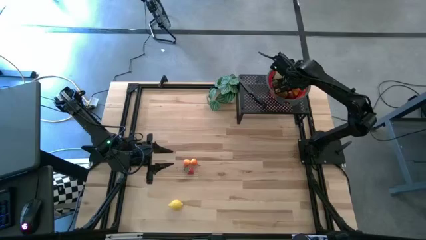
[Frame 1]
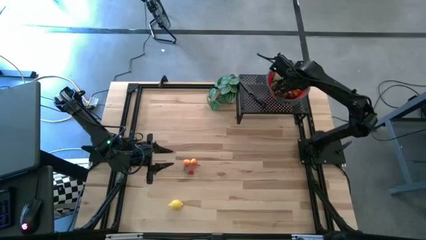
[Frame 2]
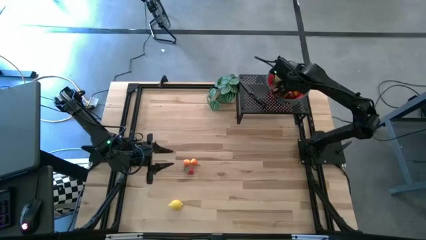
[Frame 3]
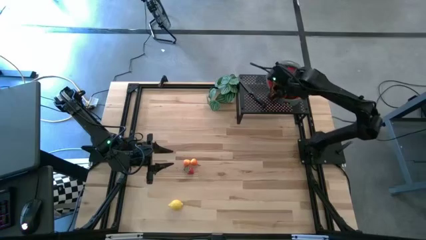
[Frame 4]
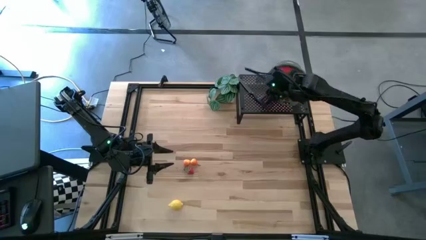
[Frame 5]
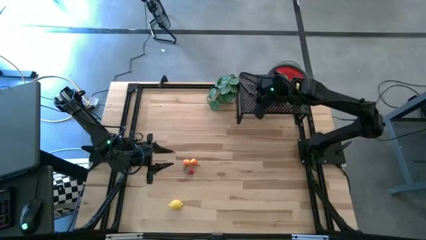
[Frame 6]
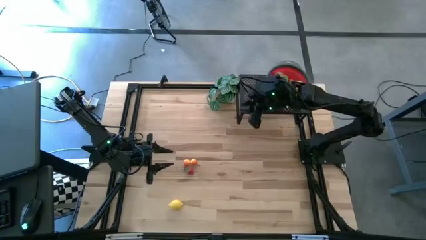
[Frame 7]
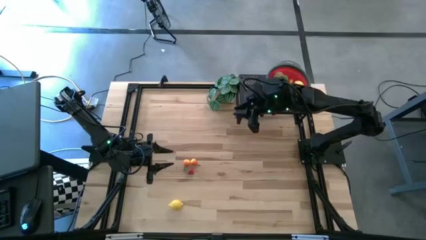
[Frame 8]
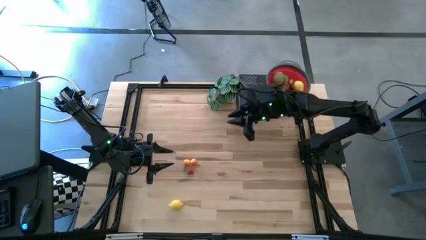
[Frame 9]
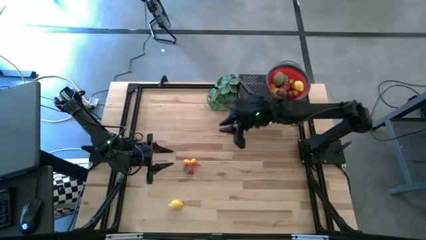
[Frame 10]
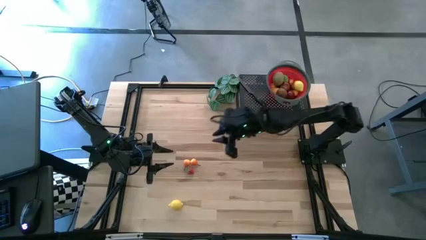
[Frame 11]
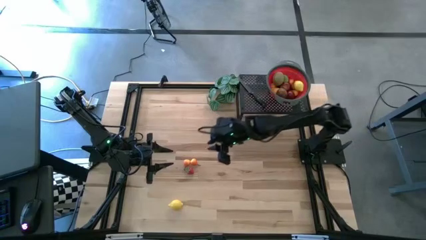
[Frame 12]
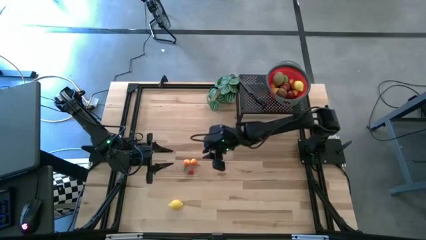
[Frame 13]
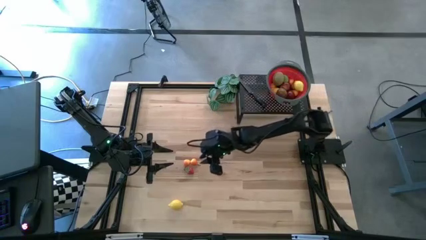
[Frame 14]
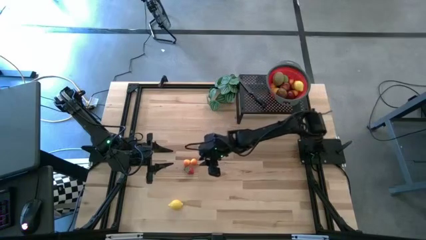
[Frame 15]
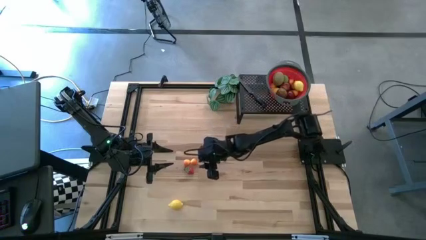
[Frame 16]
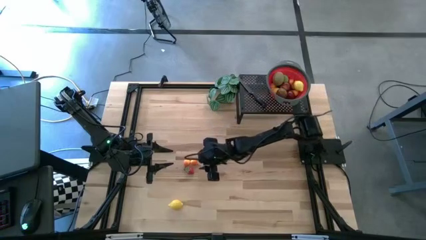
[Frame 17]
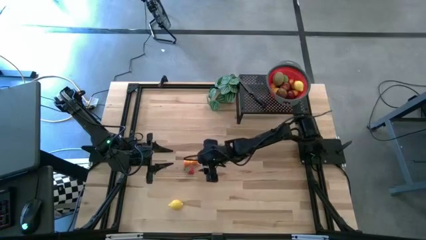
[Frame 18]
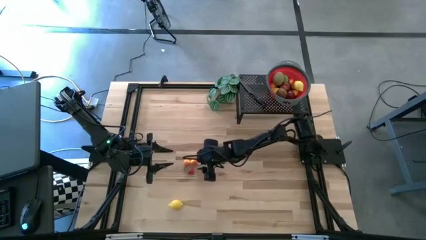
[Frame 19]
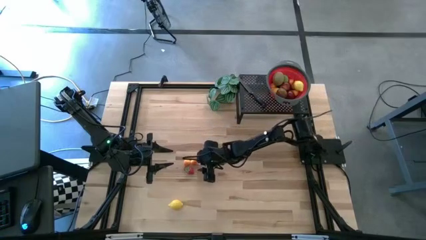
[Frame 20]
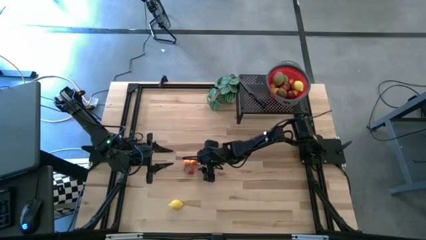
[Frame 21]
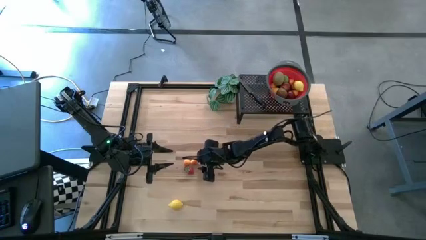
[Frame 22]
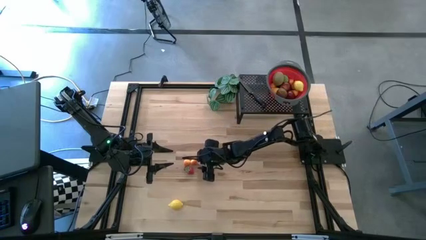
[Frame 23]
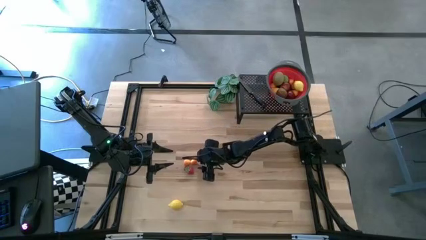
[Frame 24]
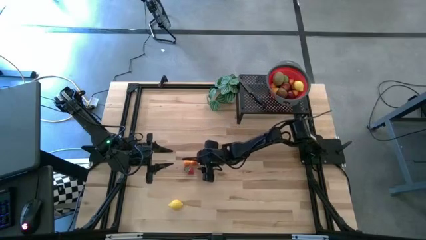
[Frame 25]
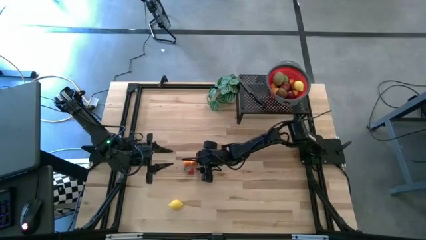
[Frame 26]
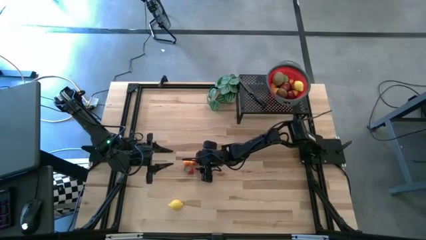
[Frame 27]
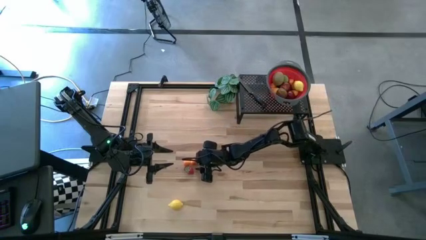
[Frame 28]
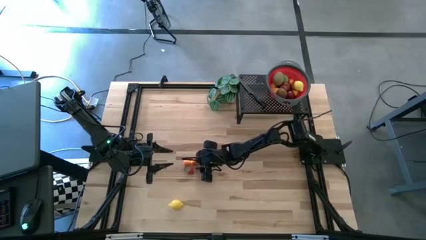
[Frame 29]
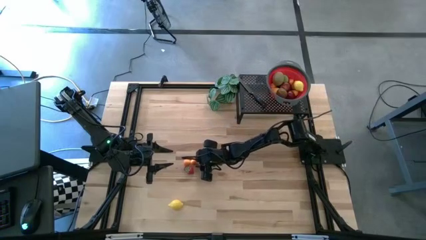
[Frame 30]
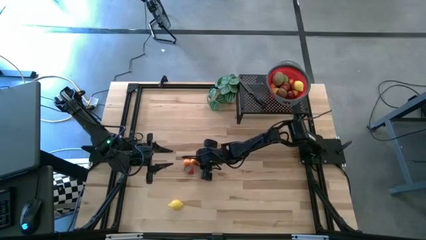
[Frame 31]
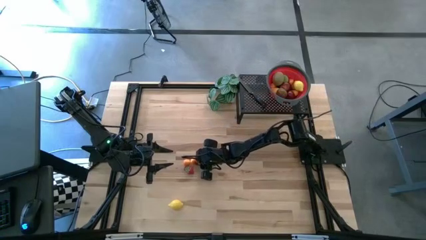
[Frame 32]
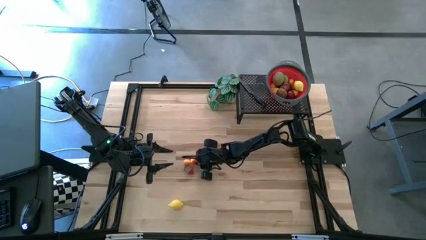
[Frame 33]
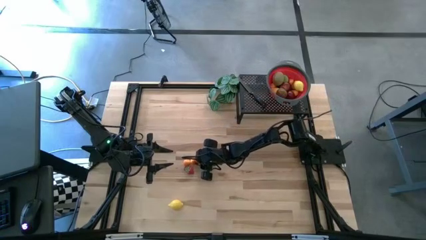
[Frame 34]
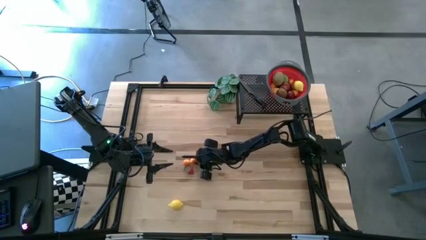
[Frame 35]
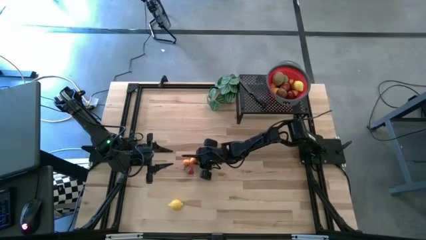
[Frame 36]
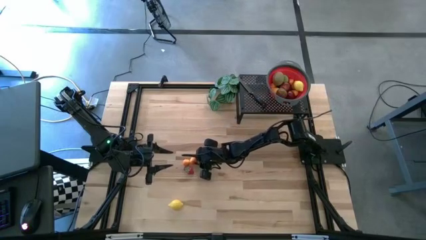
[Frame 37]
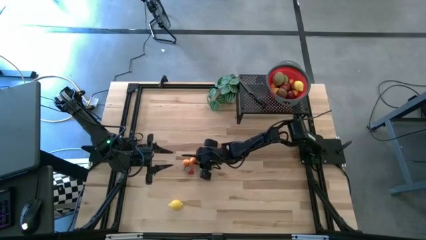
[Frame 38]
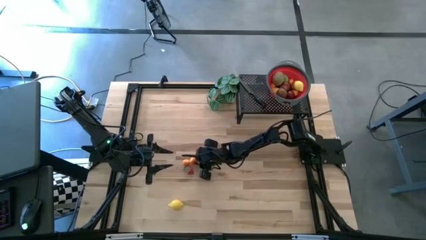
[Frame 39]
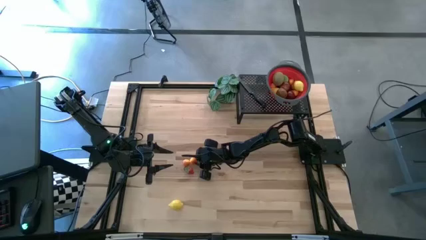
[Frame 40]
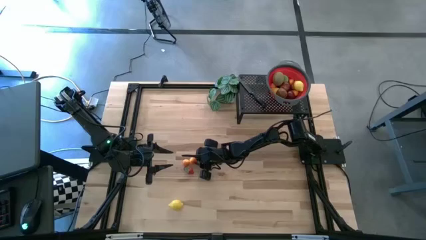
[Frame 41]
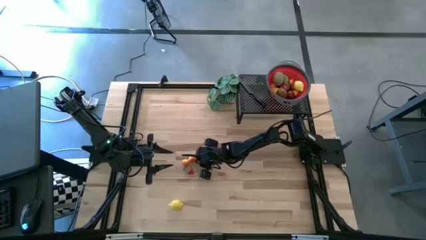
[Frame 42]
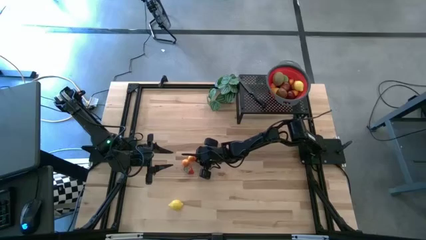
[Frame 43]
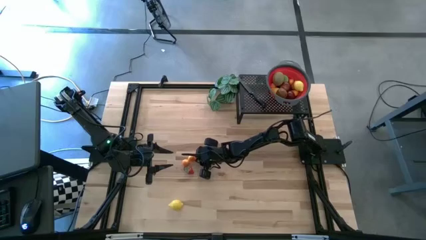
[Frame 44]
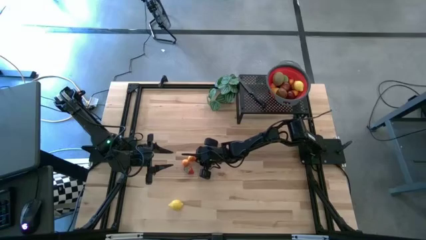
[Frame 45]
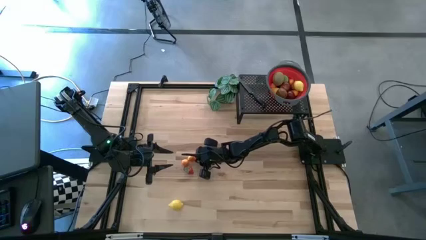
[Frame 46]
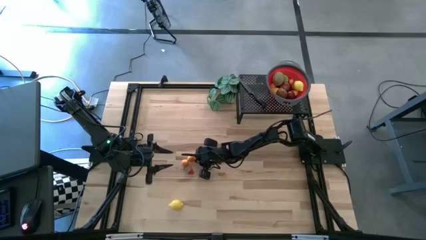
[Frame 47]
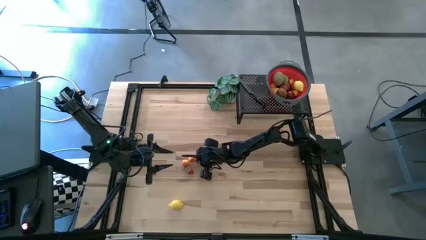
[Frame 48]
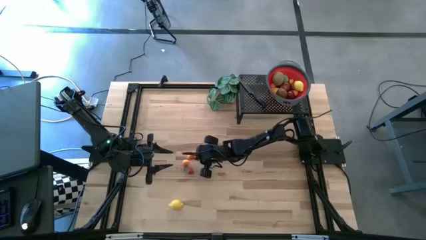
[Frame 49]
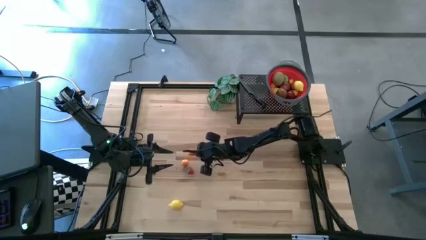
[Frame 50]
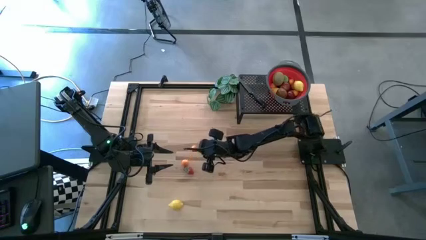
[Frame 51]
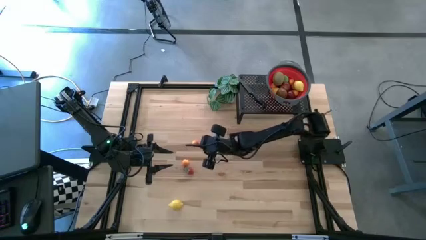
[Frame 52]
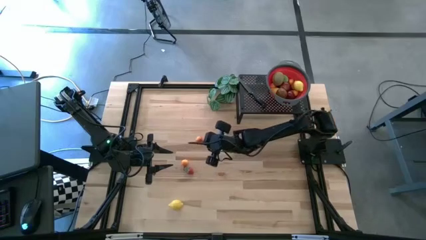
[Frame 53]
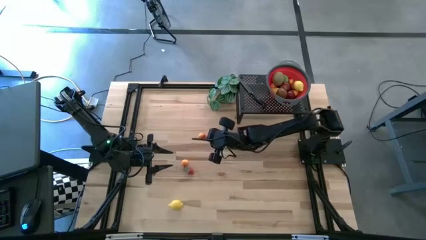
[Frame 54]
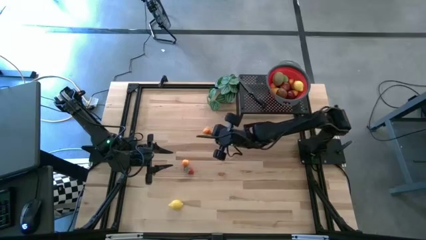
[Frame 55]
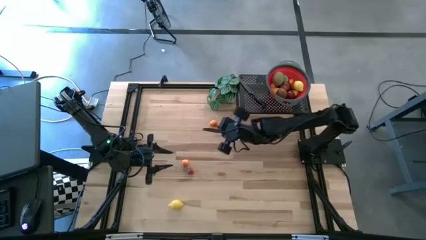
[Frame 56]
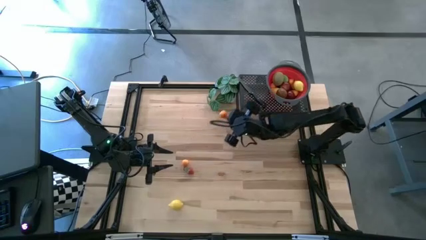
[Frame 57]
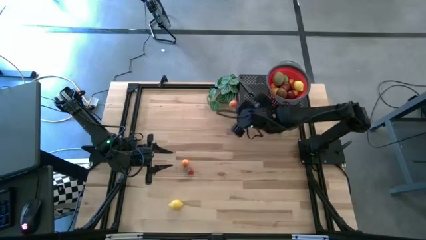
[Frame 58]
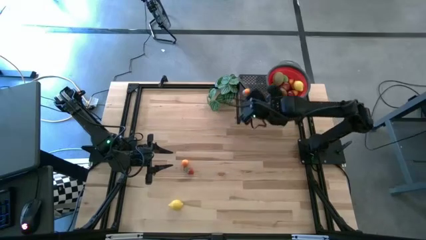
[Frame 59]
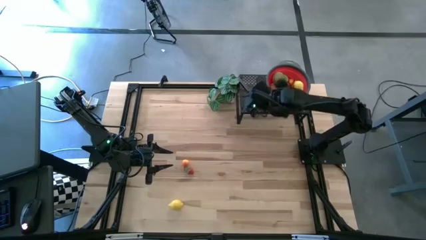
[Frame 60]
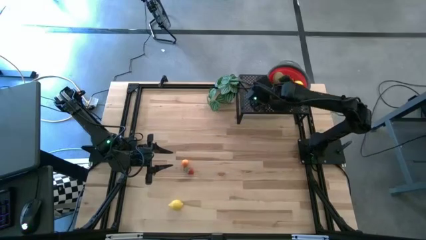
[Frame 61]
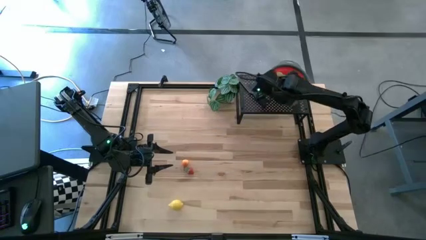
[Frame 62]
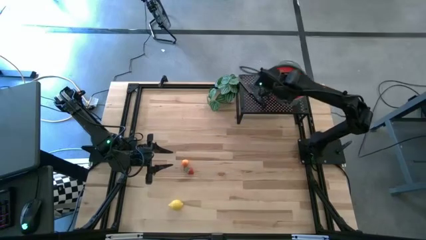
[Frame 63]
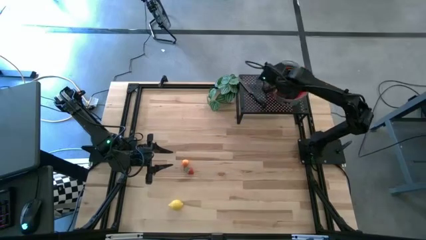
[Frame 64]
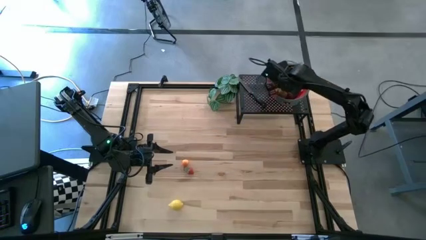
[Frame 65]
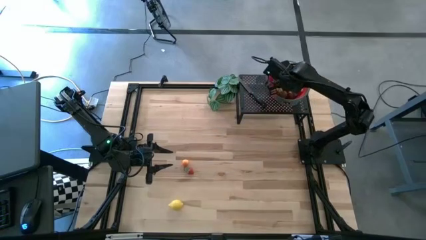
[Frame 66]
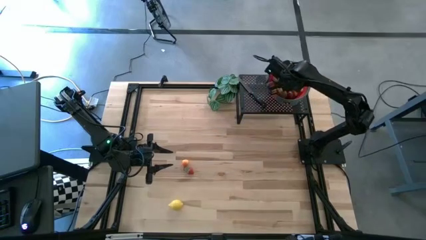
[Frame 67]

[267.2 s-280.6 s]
Task: Pick & Place Fruit
Put the orange pear into the red strainer bowl

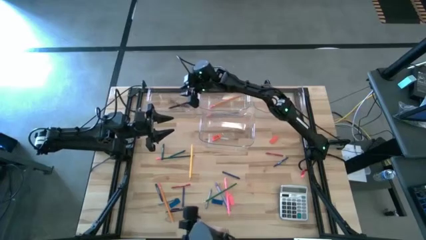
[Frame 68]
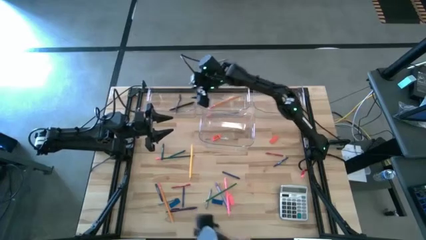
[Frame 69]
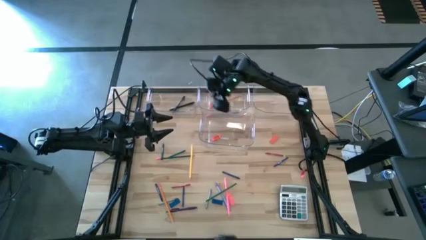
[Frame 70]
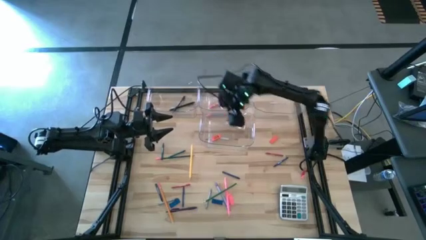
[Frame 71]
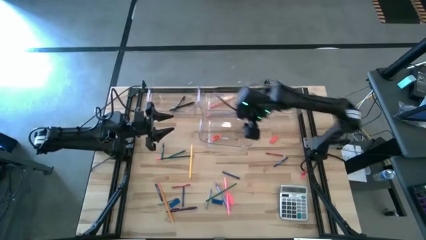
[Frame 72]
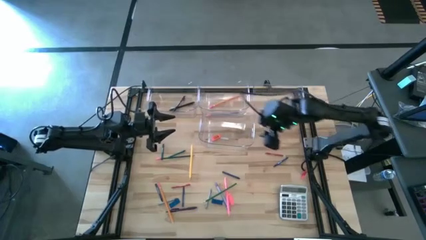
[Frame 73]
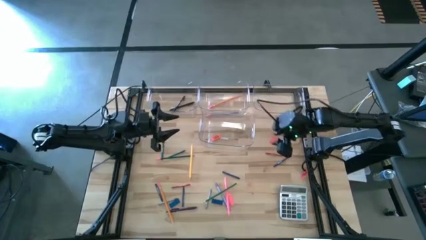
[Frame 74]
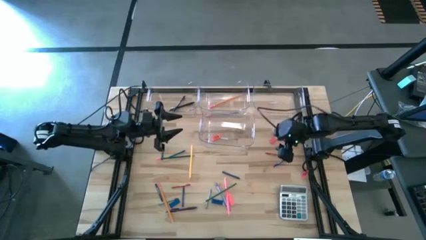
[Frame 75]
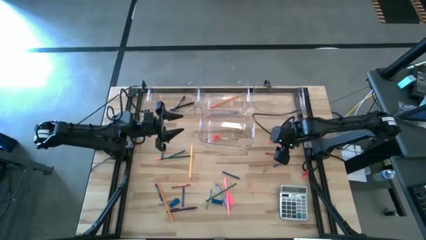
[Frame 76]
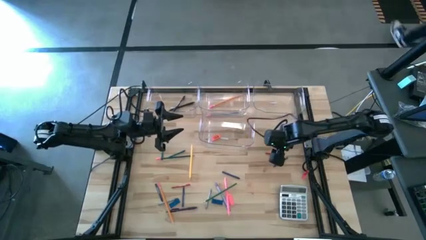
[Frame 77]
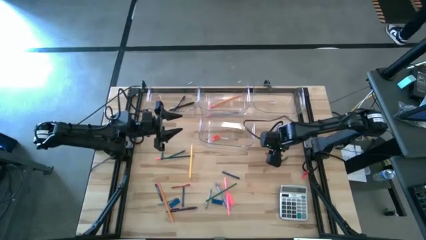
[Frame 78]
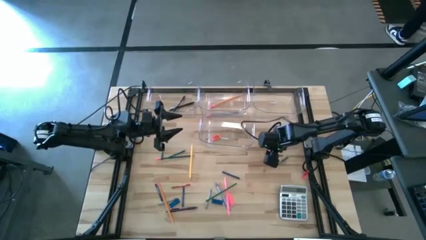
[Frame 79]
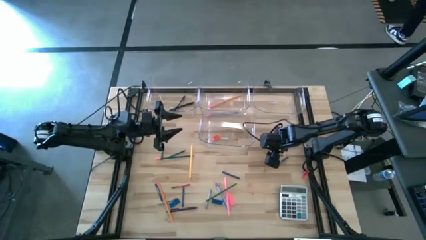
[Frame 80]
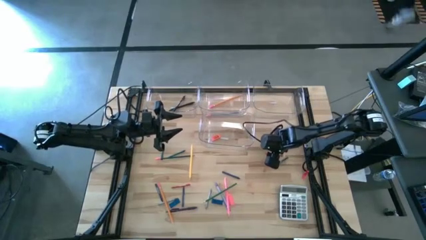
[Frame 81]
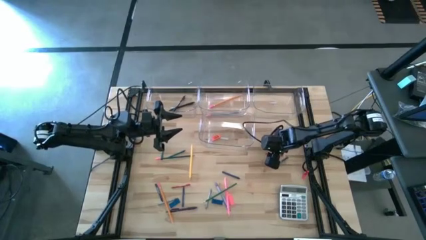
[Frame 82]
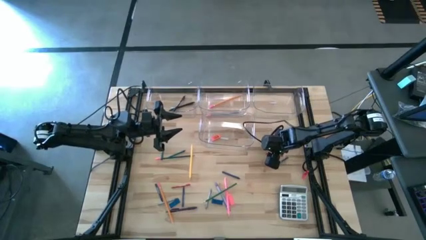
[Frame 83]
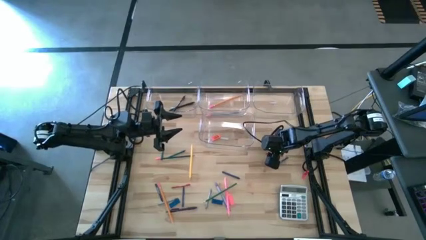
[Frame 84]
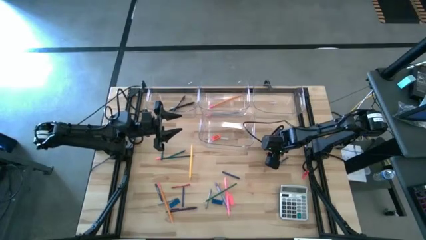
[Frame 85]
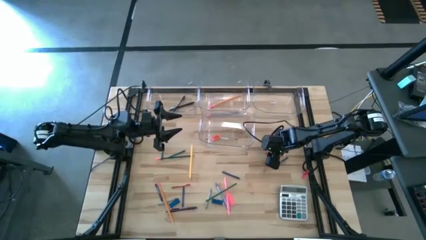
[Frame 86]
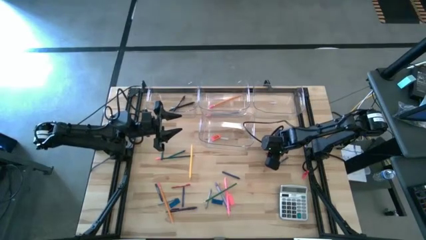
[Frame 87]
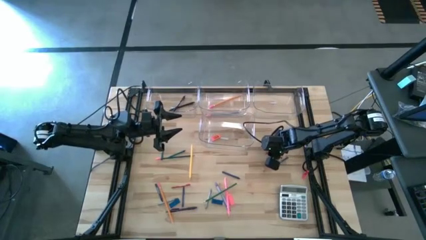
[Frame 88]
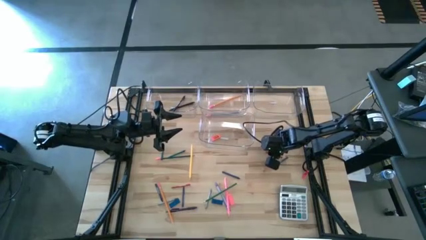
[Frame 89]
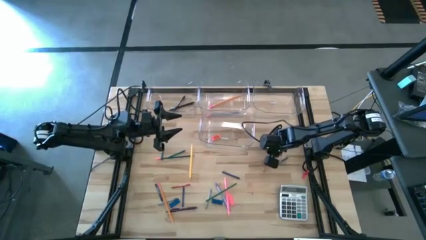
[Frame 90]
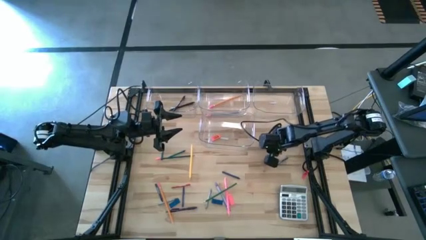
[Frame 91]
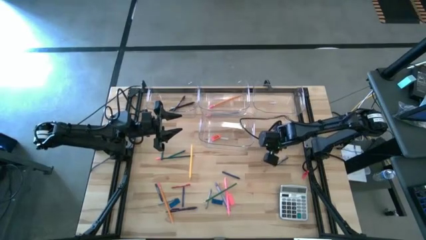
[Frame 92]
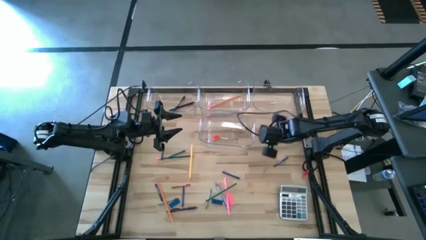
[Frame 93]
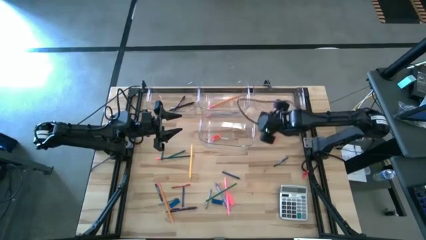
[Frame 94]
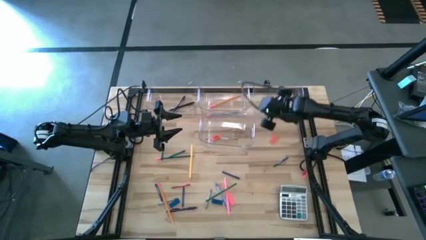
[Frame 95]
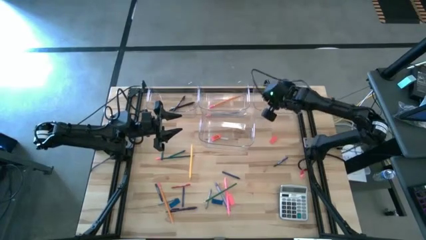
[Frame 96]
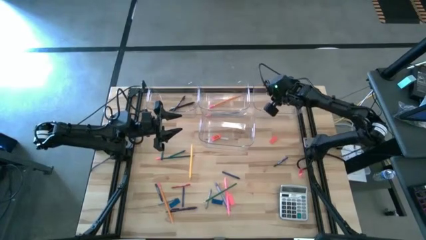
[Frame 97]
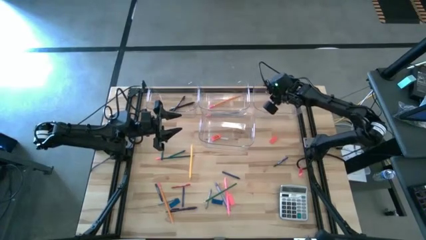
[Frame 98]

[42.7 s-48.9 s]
Task: Sort crayons/erasers/pens/pencils in bins
Put the red crayon into the top right transparent bin
